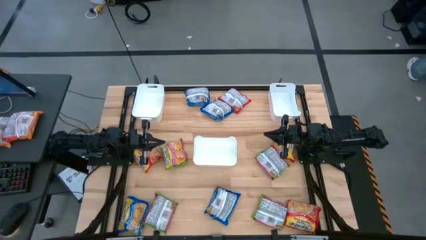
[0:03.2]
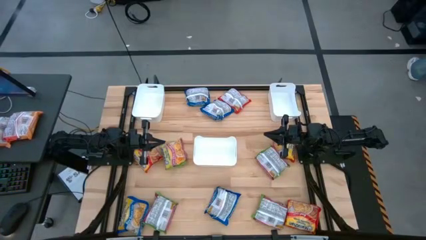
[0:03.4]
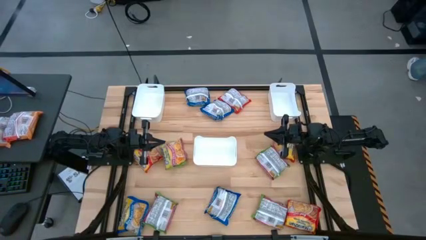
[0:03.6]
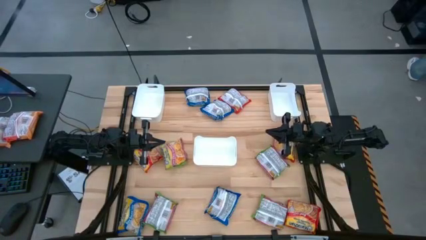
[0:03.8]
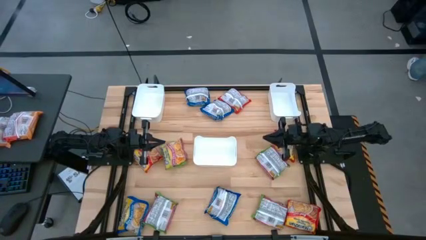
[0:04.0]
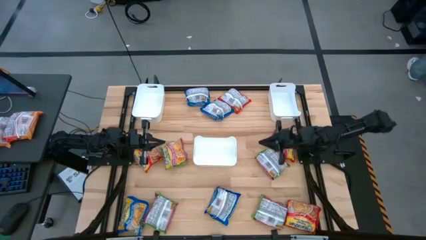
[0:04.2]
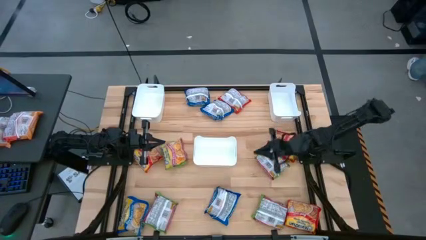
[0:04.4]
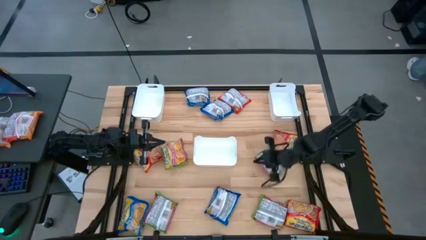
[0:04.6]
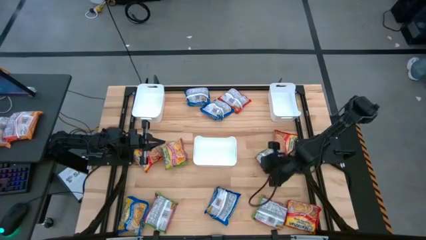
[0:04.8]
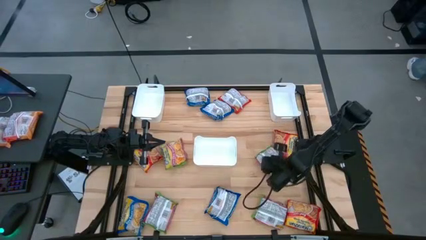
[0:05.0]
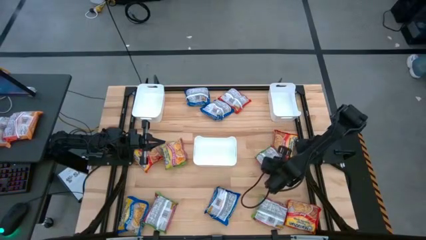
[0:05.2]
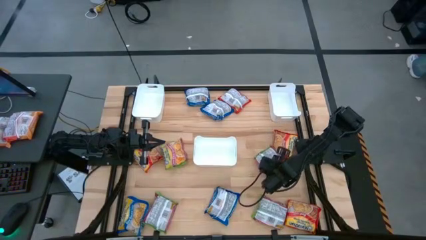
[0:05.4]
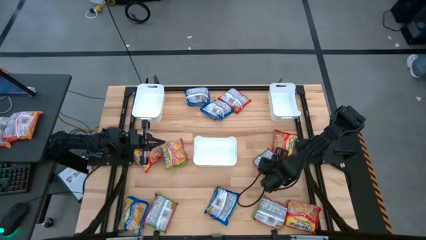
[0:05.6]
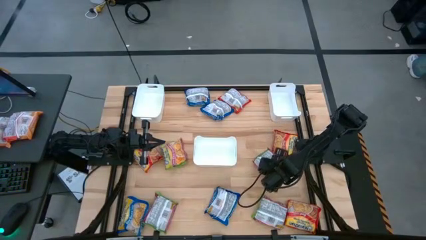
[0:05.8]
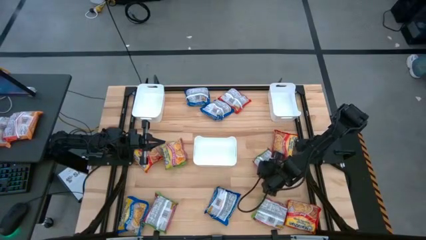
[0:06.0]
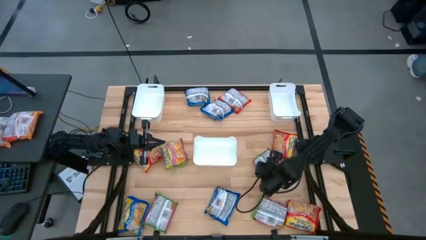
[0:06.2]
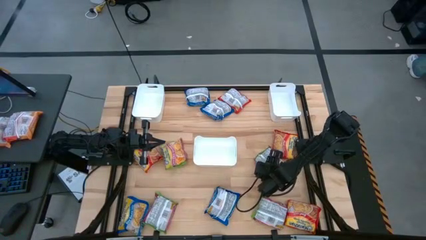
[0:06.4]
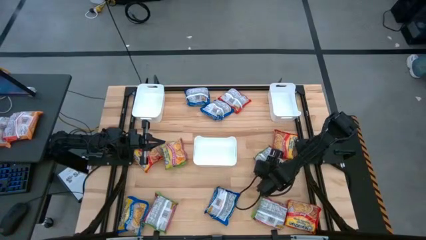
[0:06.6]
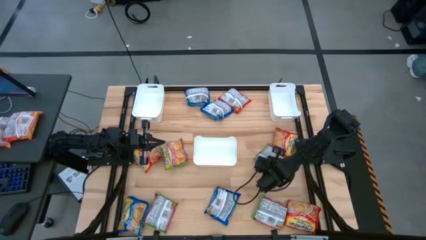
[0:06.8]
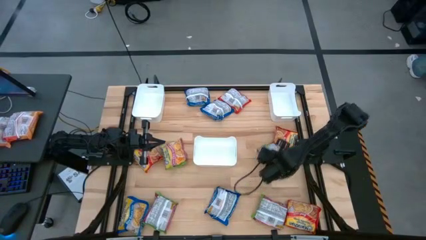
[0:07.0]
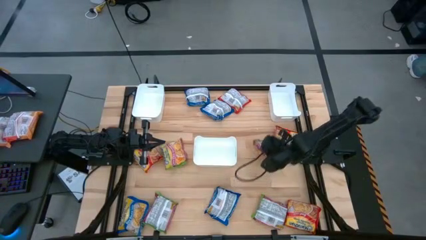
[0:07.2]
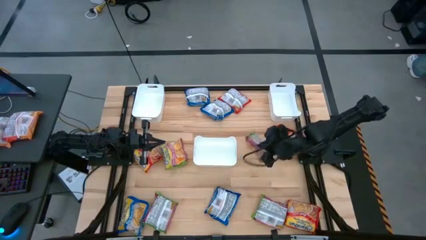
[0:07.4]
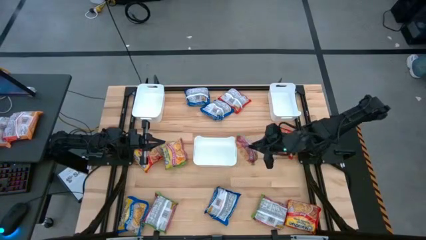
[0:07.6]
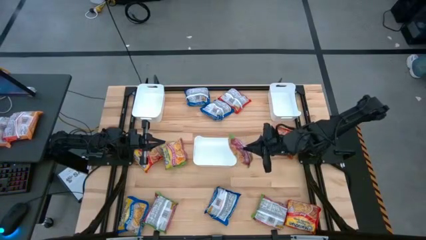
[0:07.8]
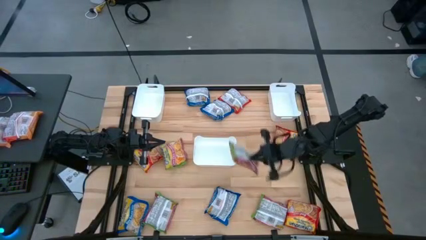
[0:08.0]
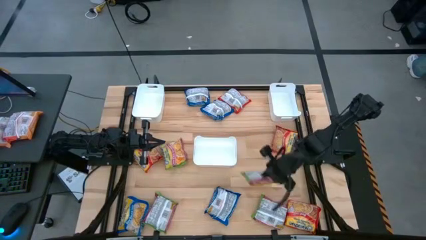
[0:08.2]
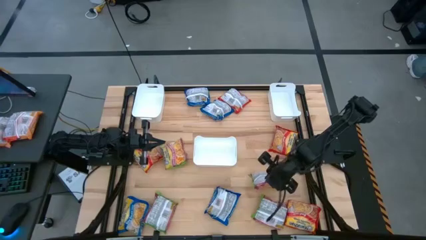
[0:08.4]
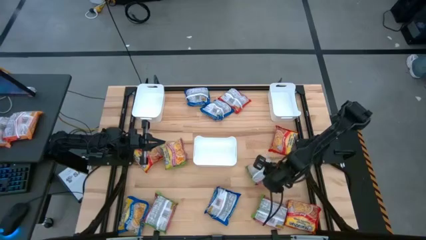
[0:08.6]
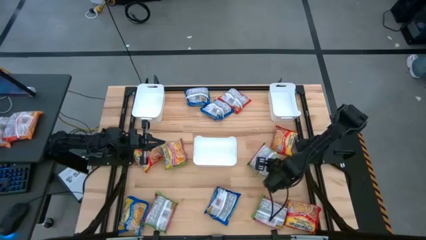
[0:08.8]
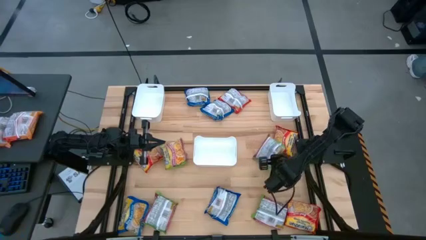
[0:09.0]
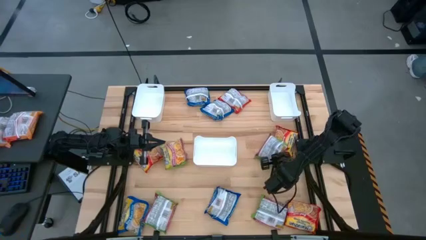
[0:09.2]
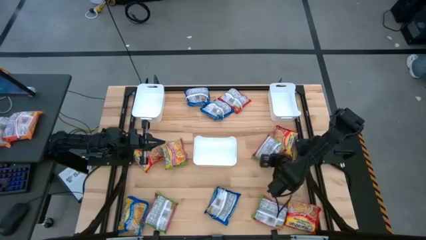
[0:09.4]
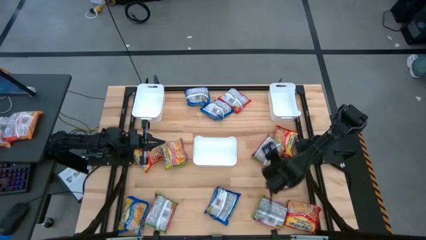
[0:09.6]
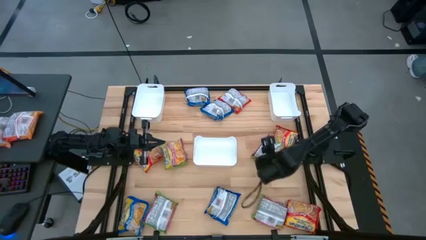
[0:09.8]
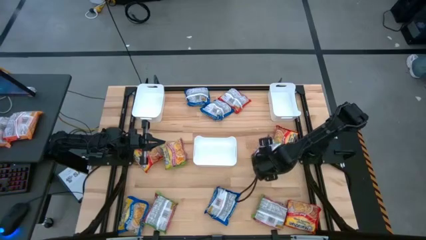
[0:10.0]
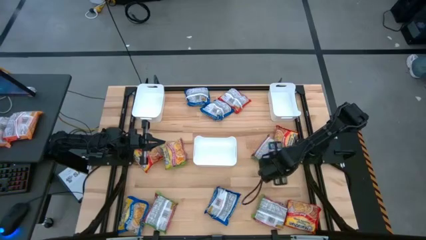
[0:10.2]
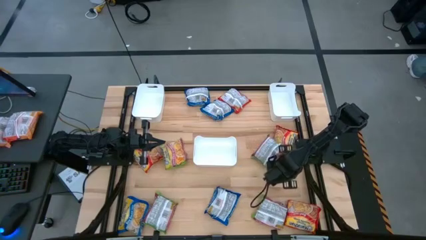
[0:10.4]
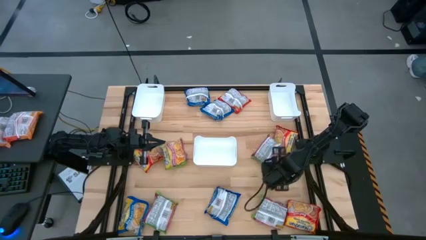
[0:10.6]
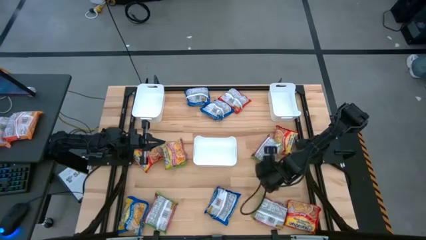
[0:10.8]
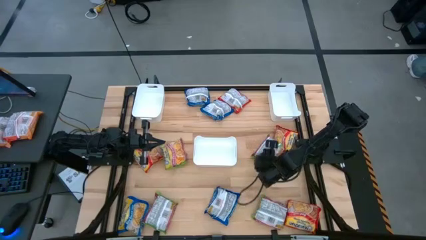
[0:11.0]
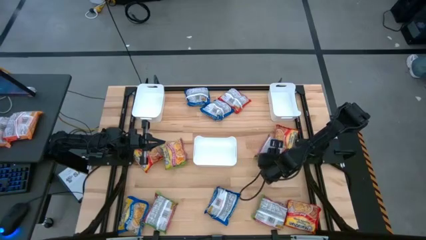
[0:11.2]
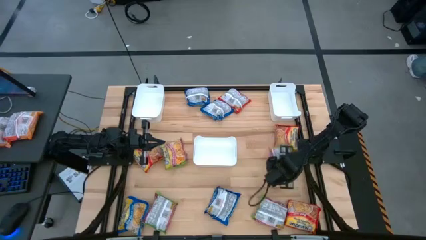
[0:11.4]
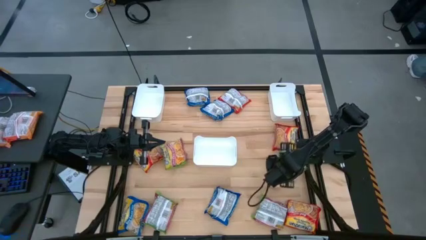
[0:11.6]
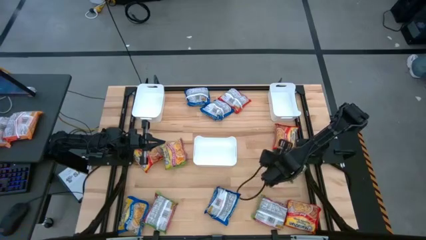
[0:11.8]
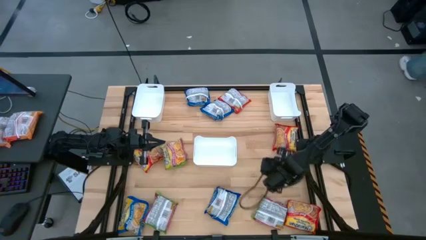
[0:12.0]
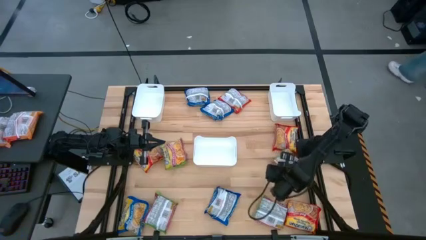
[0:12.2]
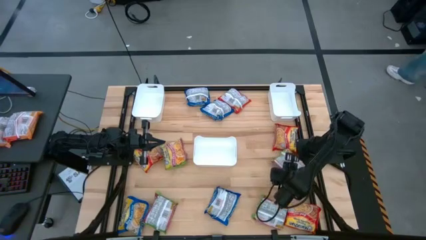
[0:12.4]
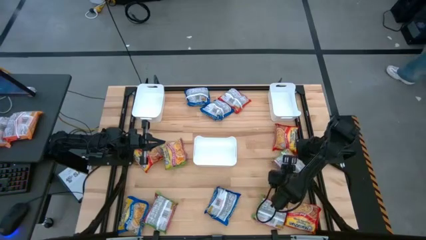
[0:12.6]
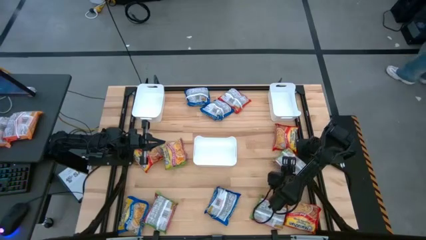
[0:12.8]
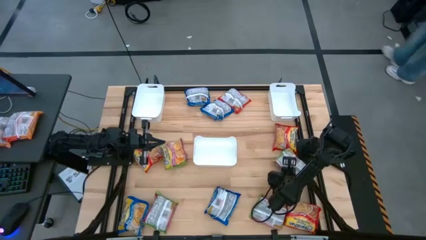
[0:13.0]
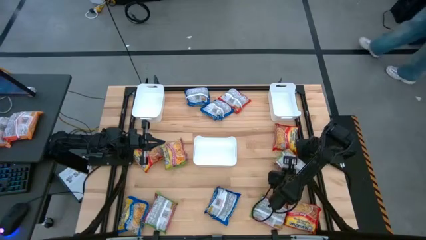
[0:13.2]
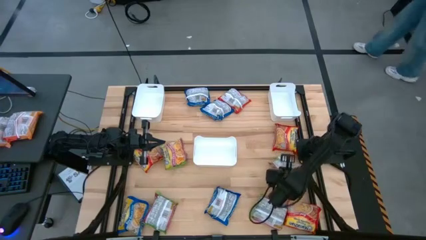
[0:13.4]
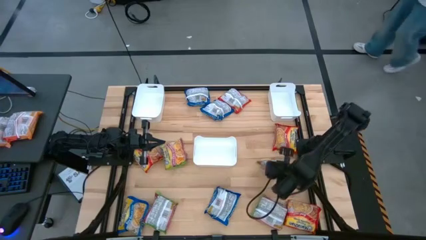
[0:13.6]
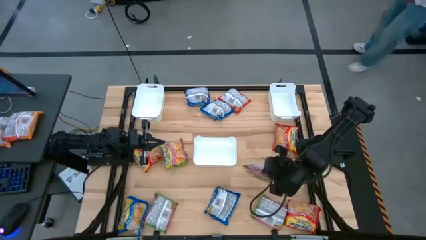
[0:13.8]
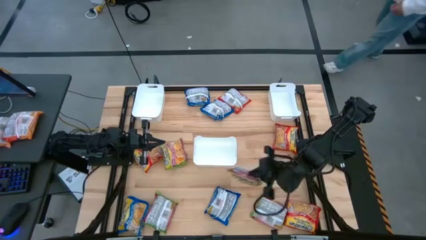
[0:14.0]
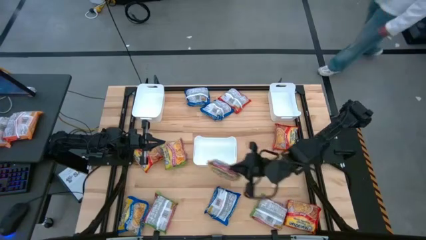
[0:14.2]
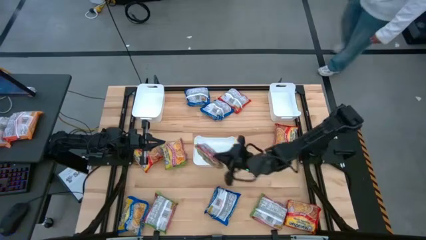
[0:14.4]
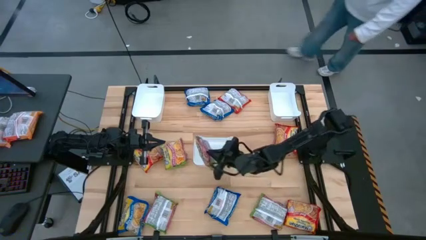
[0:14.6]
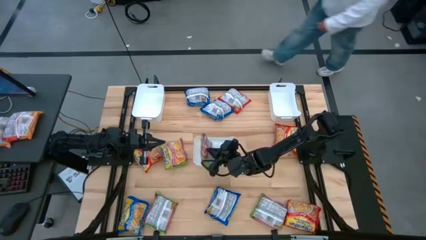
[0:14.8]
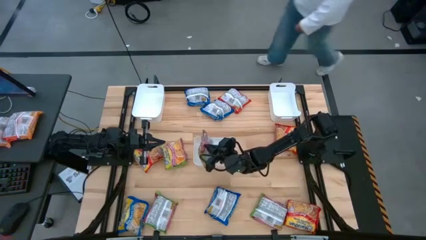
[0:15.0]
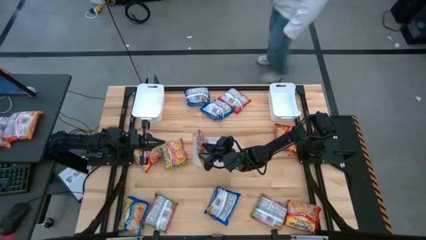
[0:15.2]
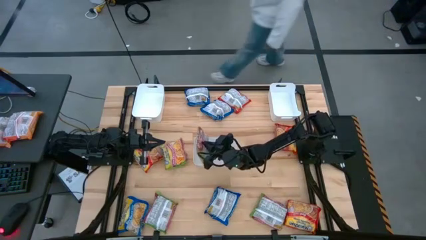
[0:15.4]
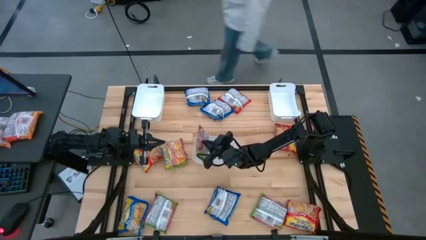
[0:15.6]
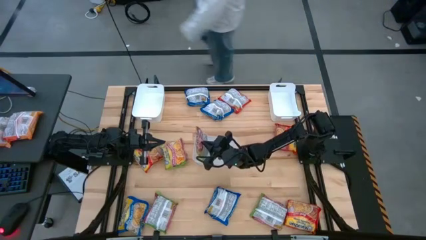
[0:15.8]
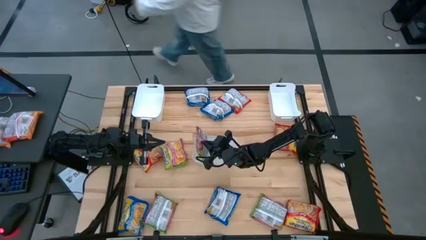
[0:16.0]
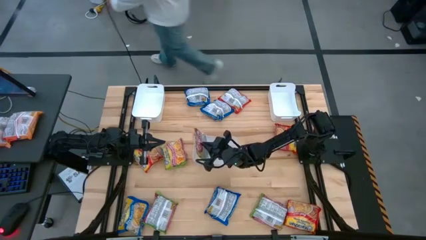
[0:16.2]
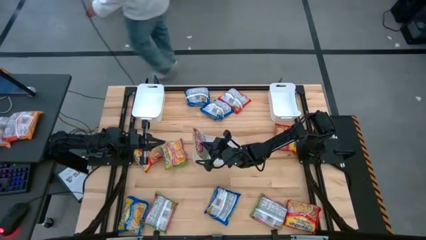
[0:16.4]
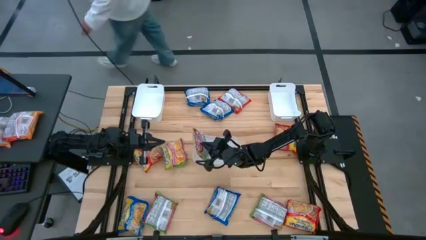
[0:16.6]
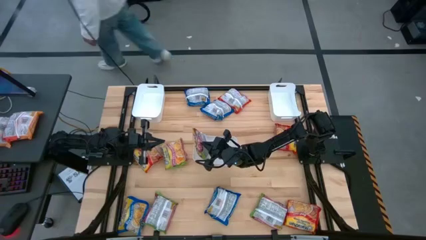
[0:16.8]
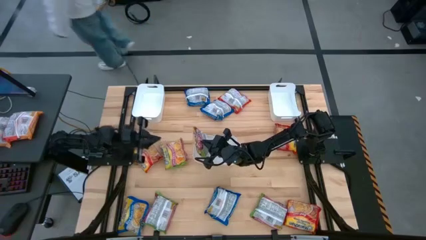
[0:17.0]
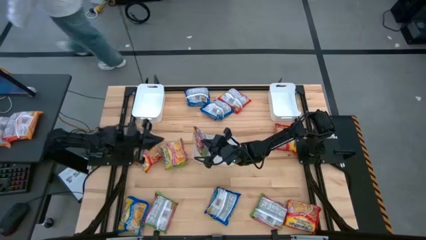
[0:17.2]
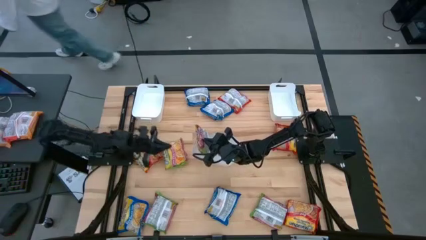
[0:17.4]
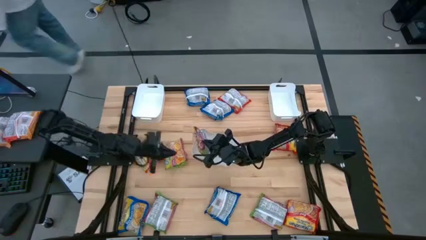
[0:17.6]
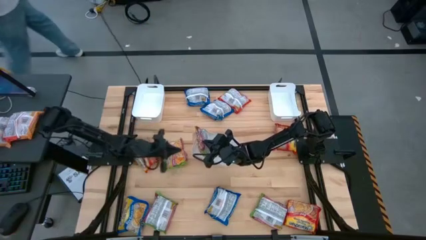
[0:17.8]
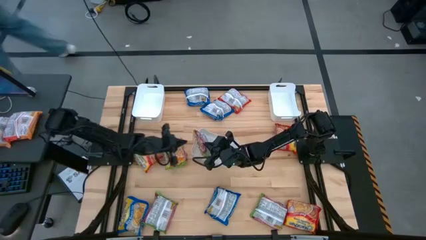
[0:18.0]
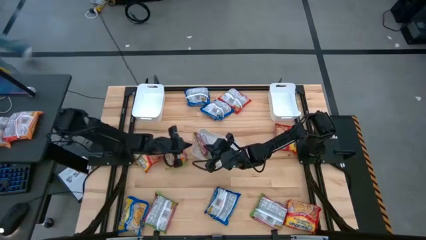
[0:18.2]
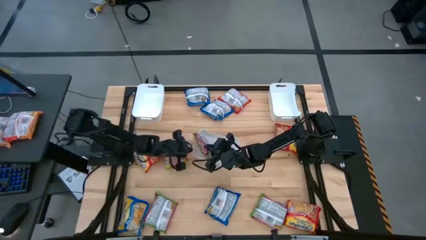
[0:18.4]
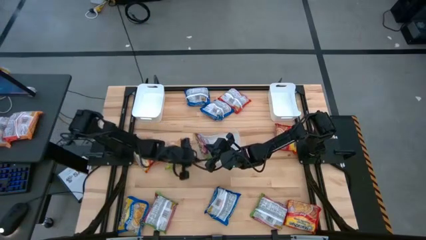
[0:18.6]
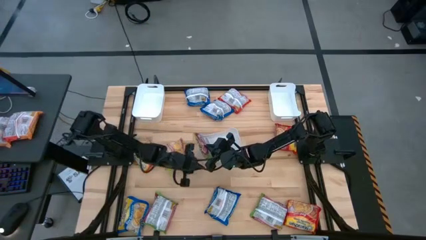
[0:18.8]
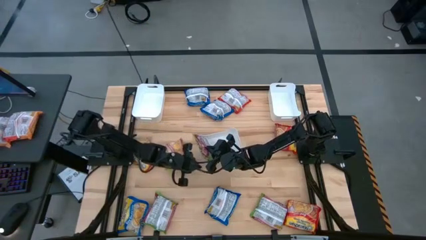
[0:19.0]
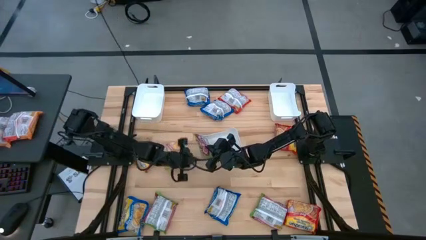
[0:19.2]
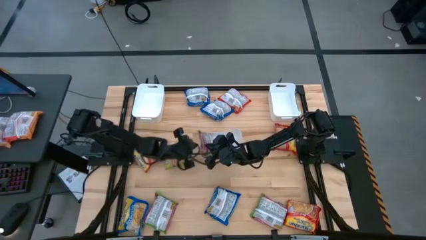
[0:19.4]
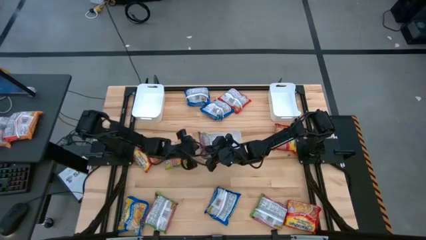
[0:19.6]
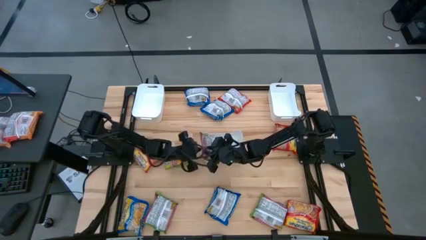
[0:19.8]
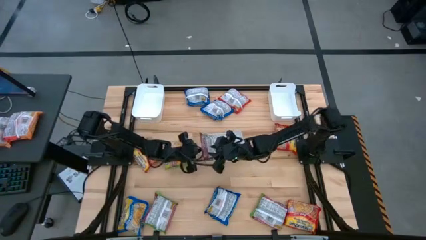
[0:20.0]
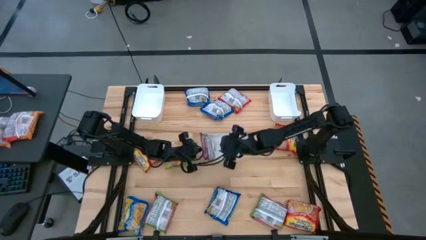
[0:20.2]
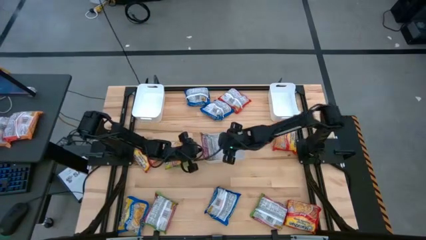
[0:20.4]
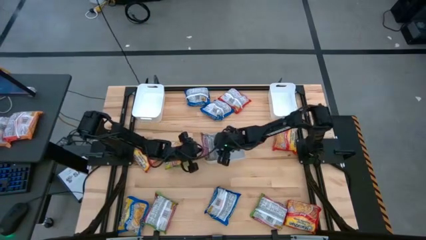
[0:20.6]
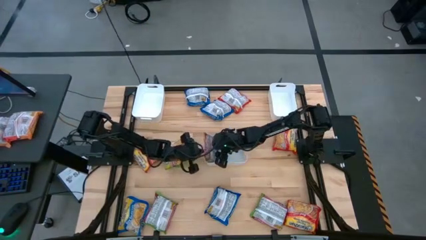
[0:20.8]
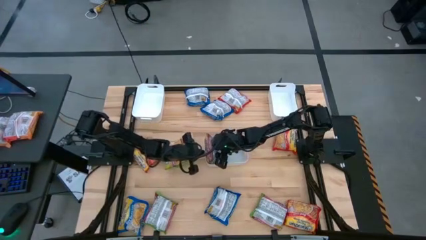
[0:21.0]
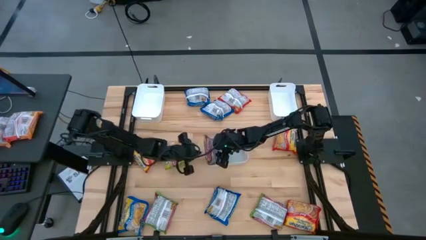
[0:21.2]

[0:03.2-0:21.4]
Task: Sort Maruchan noodles
Put the green noodle pack into the bottom white bin
